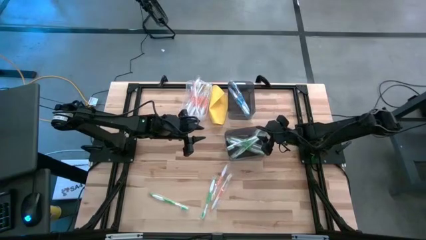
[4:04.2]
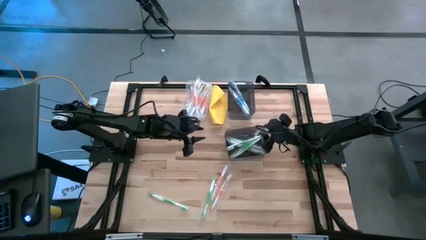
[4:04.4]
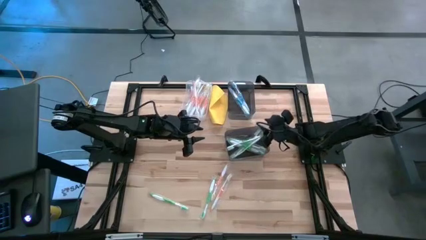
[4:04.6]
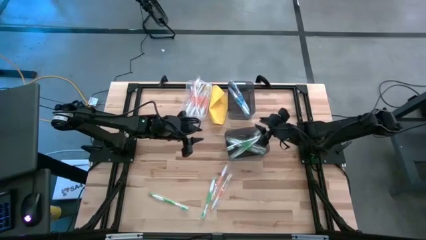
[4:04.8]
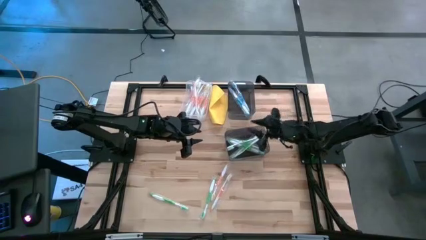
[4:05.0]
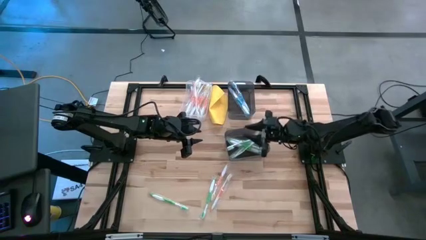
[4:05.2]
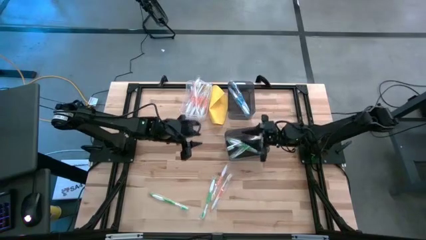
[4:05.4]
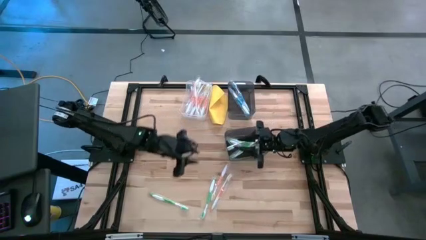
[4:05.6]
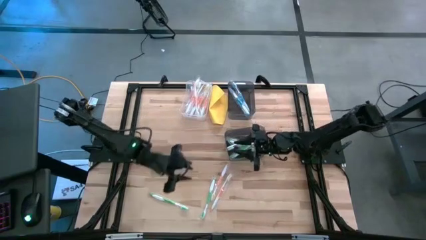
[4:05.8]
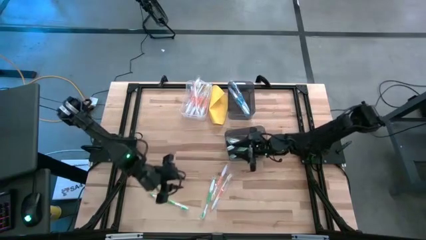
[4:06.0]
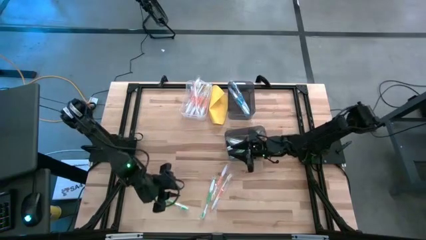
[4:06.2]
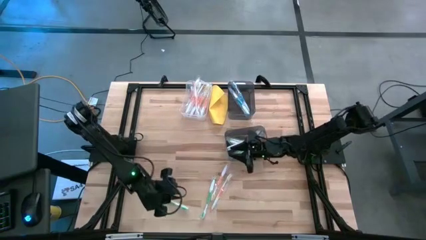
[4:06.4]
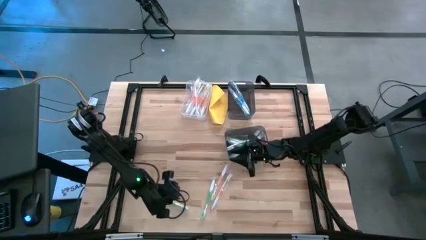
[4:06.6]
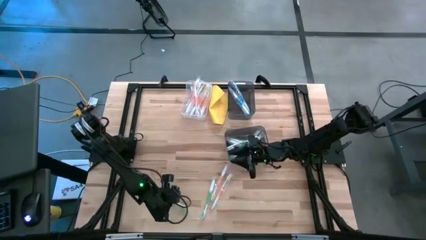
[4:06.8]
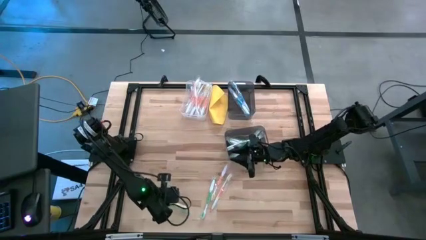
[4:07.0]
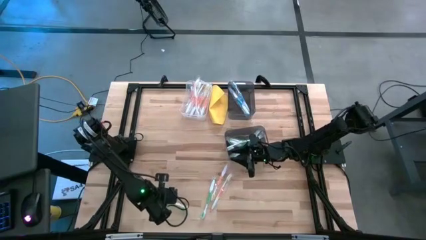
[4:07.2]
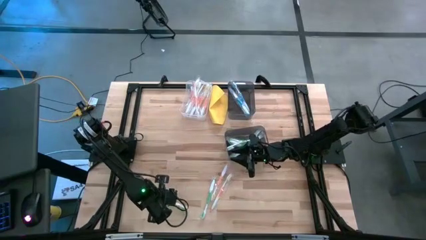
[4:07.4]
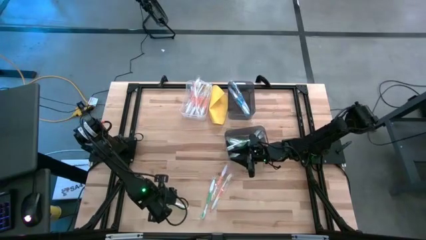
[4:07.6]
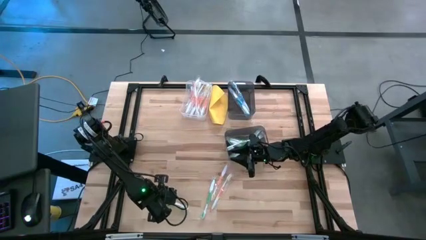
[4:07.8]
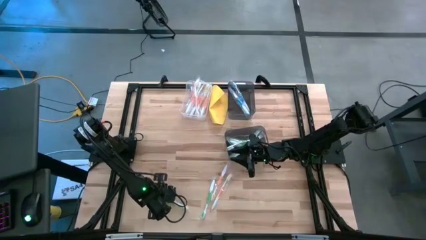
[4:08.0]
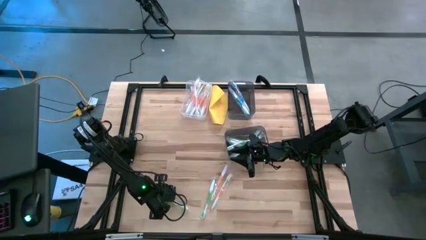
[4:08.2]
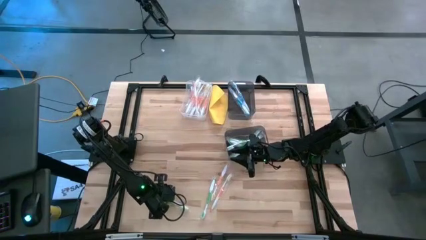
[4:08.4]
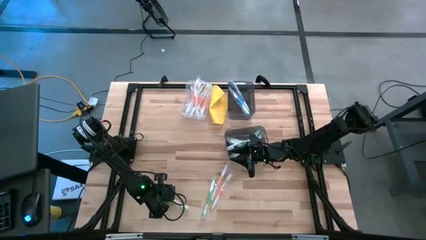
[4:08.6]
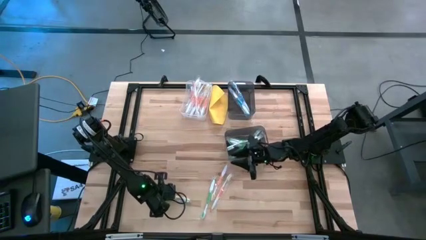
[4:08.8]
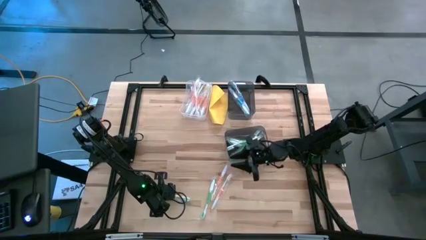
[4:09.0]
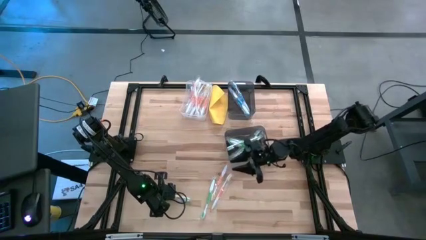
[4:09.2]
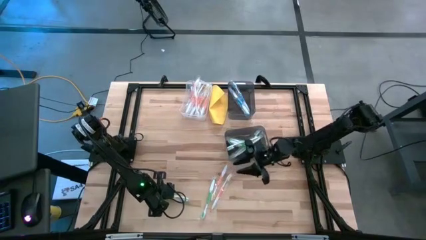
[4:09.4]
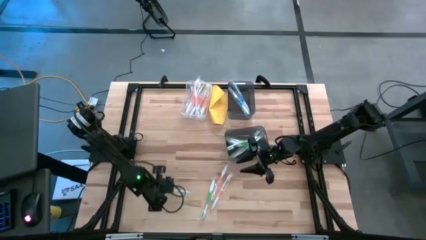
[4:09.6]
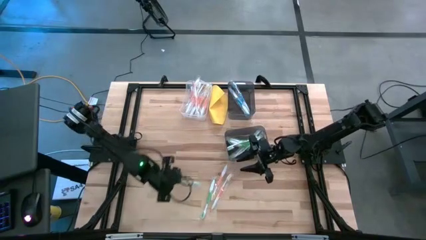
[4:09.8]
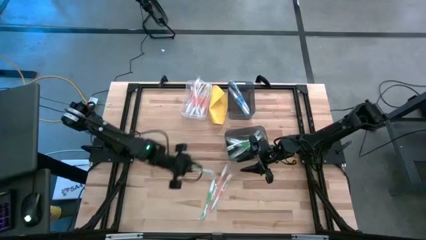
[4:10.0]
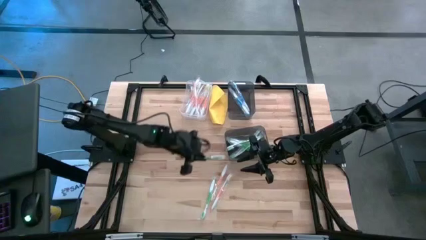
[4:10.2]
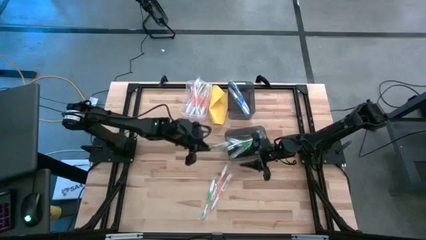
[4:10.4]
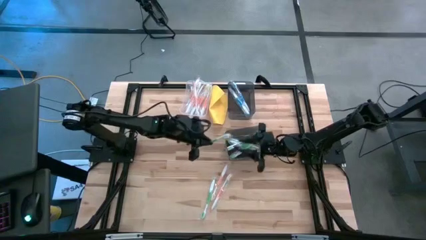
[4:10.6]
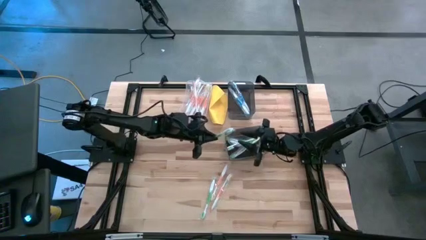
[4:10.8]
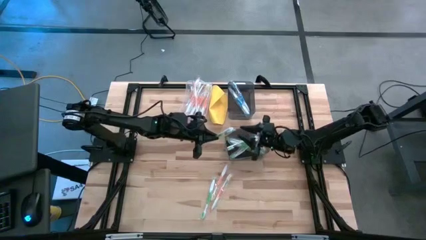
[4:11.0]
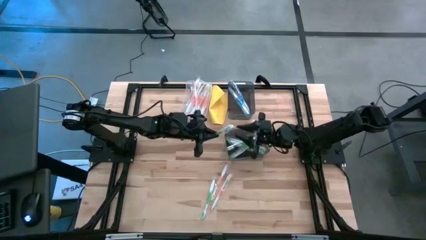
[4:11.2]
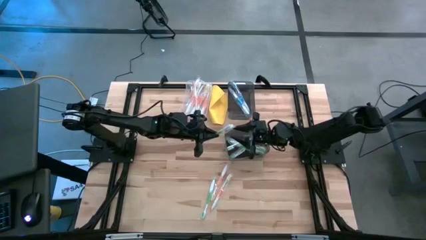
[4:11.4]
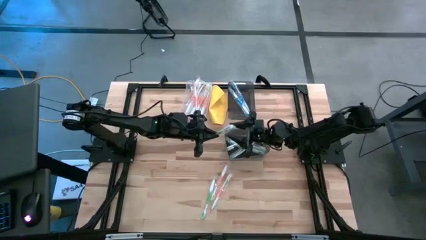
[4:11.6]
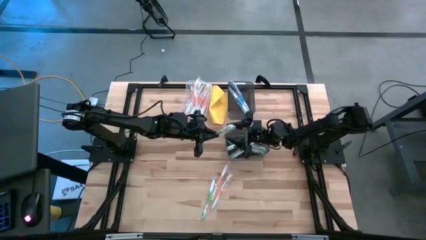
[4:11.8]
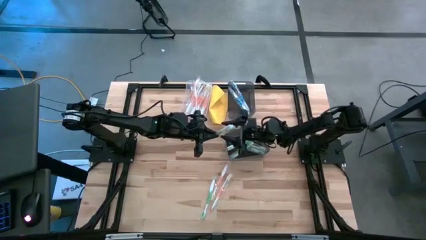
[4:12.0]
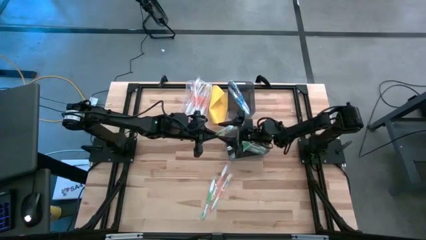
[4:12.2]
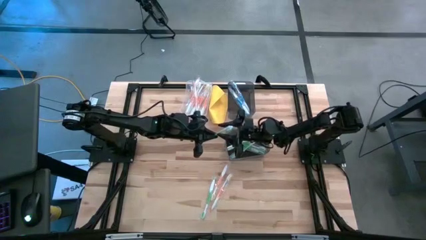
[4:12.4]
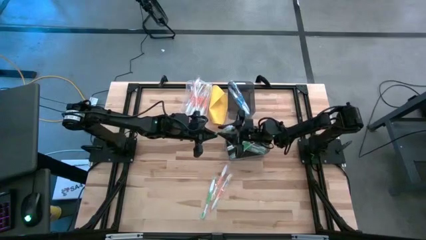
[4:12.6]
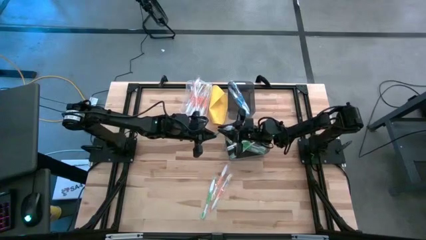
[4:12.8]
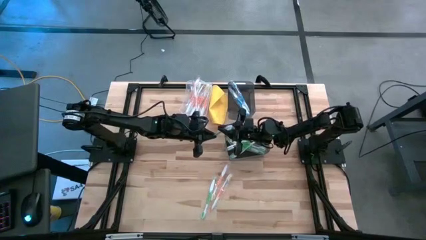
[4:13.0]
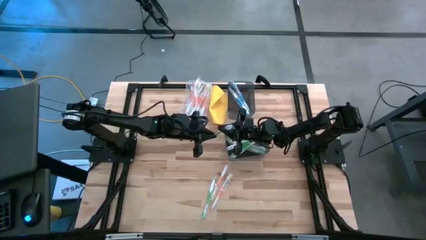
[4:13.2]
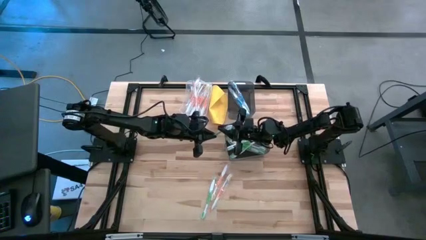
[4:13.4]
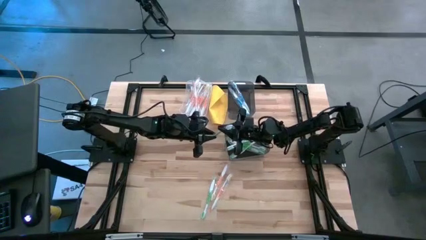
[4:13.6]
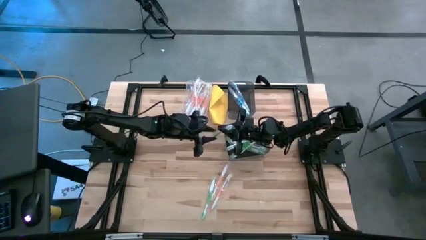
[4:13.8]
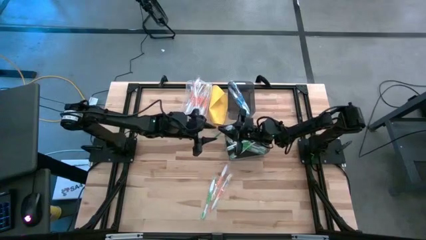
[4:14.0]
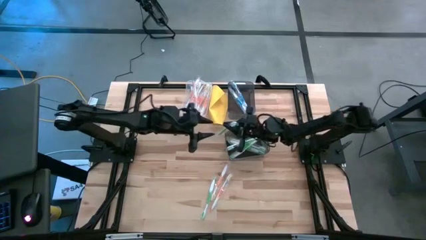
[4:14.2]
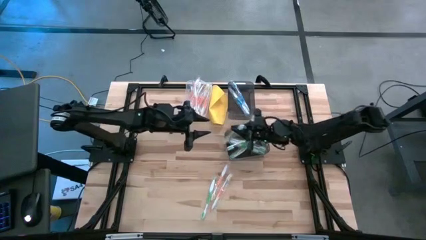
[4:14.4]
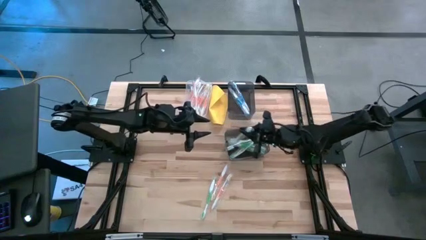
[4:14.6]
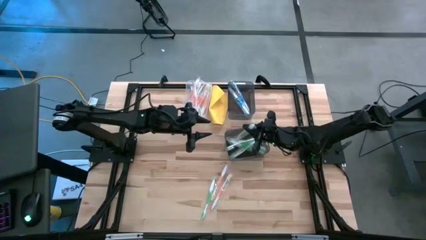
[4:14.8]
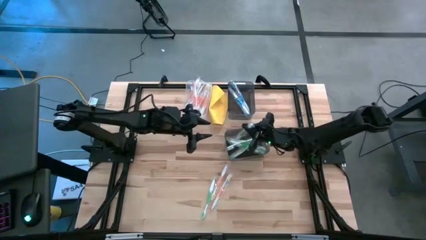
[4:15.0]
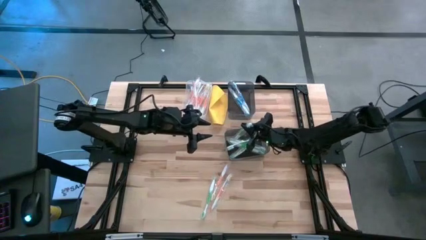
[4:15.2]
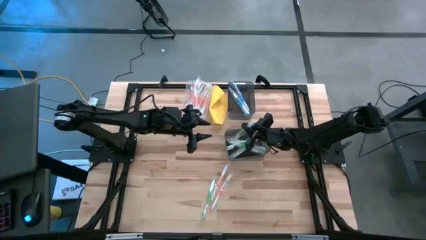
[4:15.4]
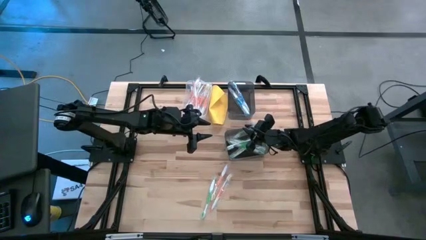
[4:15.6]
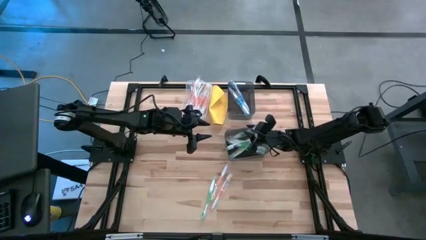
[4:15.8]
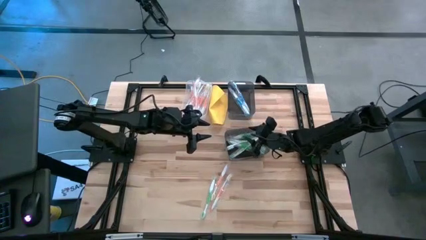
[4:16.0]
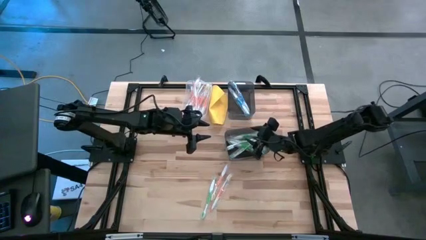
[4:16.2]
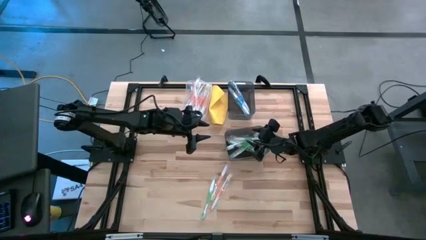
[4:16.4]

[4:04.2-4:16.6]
Task: Pick & Place Toothbrushes
Put the green toothbrush into the bottom black transparent bin

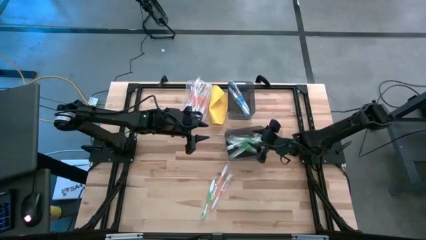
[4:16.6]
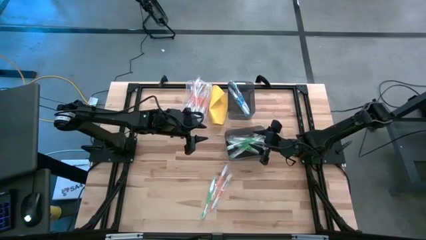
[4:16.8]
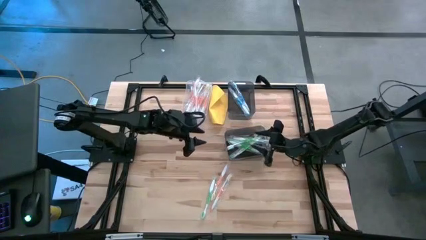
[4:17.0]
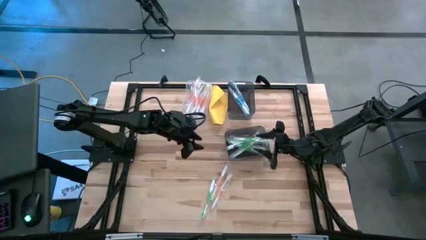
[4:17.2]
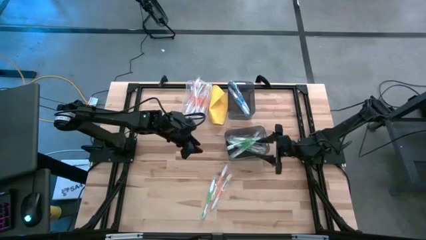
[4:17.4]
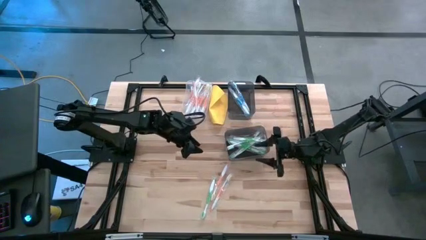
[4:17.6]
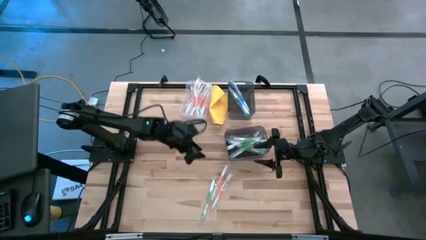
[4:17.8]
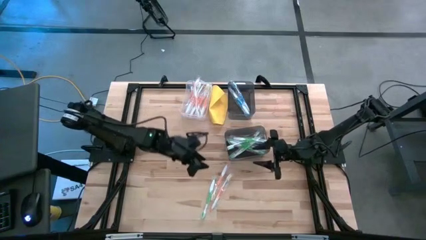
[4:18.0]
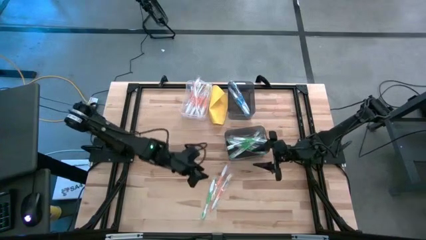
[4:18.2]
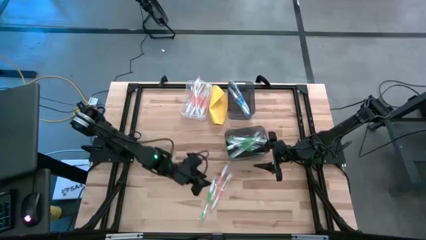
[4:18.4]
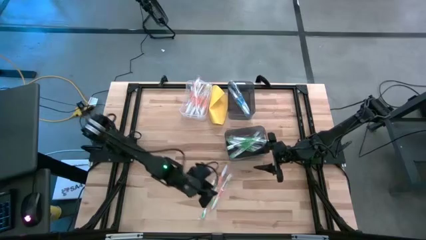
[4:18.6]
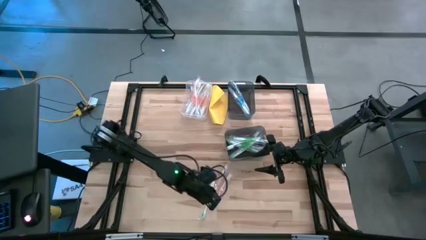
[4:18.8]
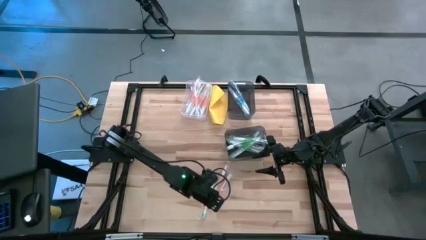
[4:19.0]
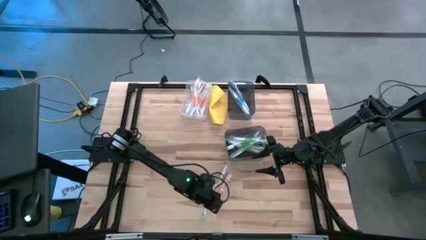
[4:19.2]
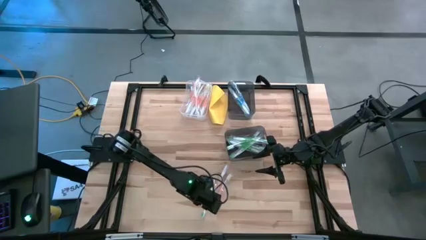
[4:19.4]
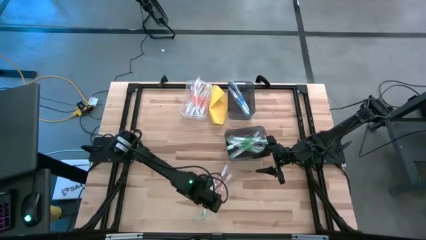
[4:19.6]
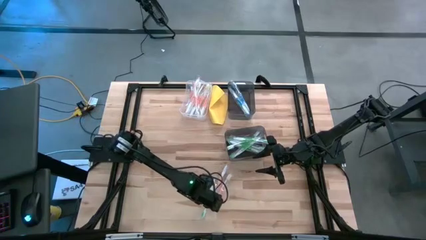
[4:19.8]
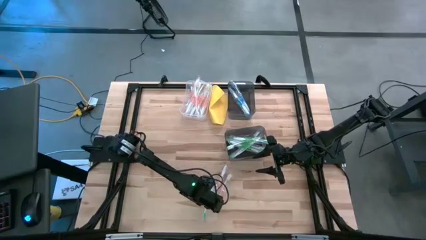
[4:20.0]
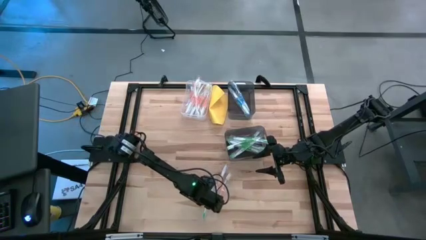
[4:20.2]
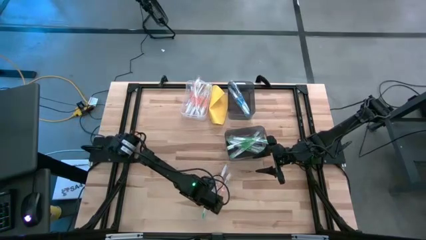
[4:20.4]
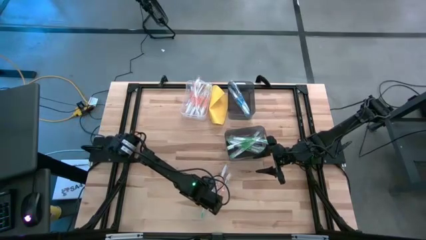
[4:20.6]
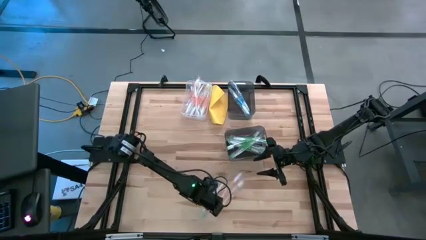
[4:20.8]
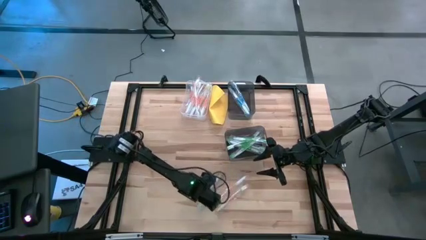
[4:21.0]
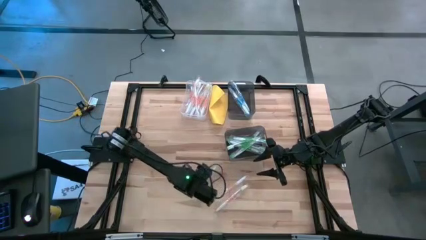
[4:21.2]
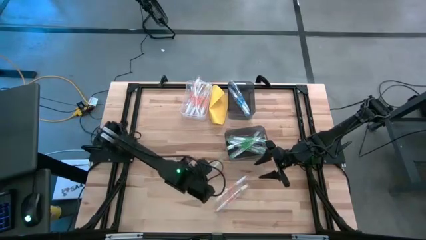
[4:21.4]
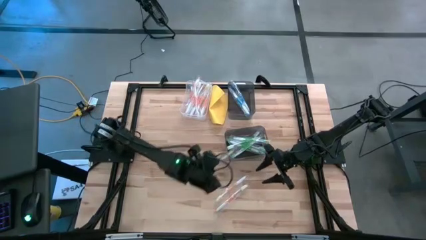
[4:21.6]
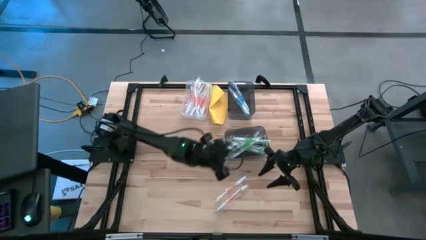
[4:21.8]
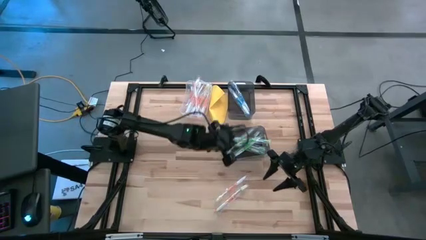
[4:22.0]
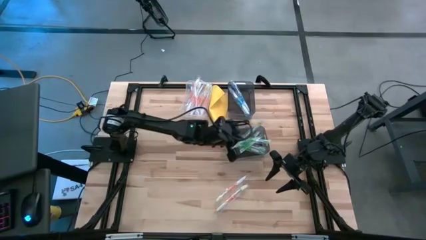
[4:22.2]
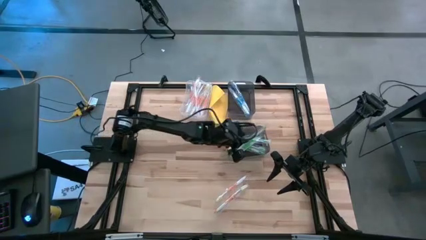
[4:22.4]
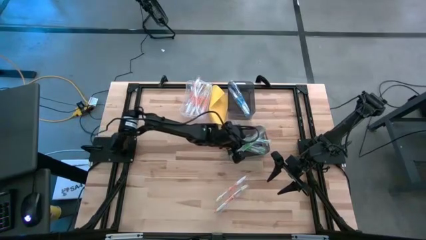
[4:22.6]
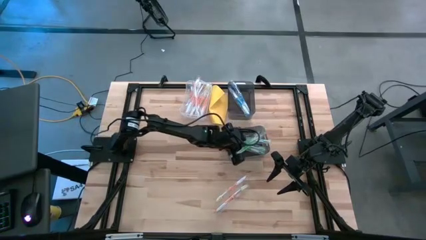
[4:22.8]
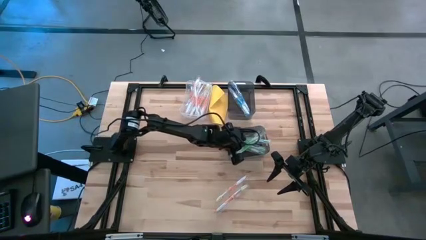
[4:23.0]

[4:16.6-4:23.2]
Put the green toothbrush into the bottom black transparent bin
